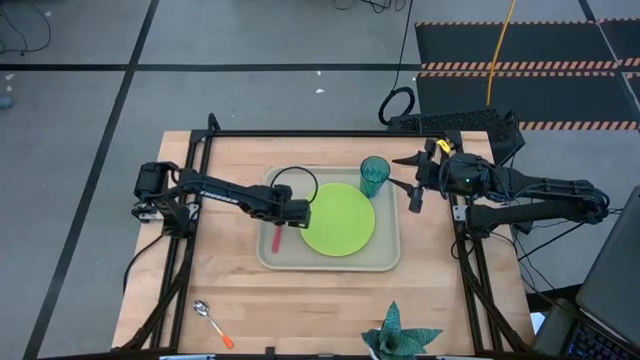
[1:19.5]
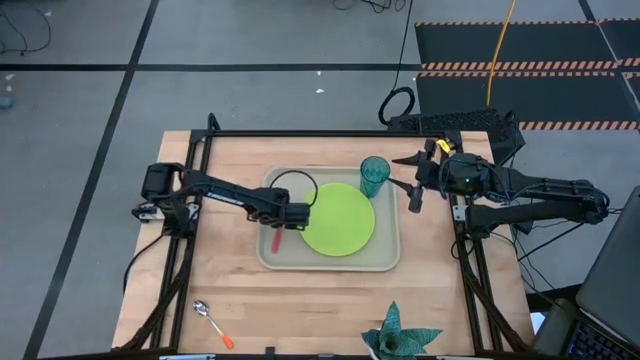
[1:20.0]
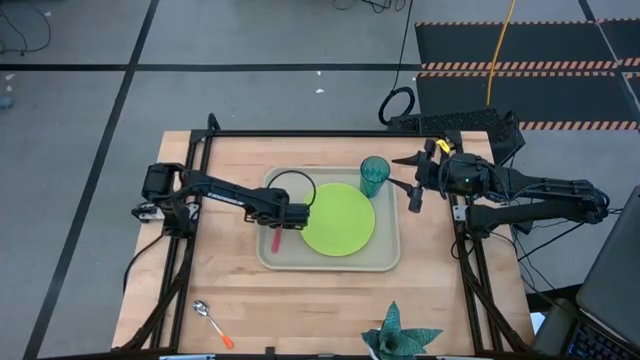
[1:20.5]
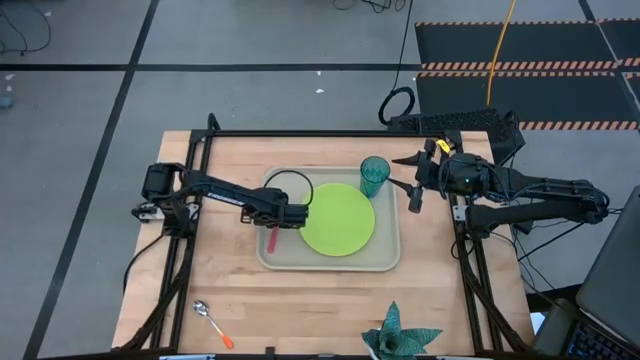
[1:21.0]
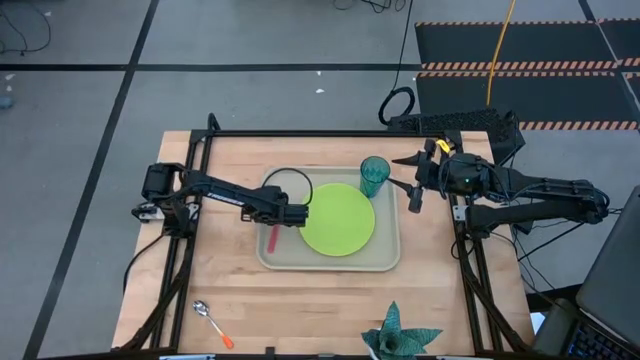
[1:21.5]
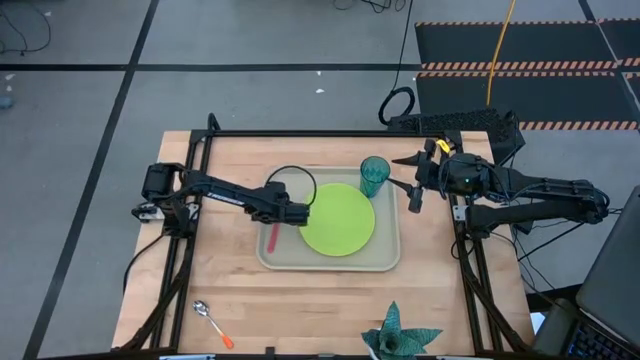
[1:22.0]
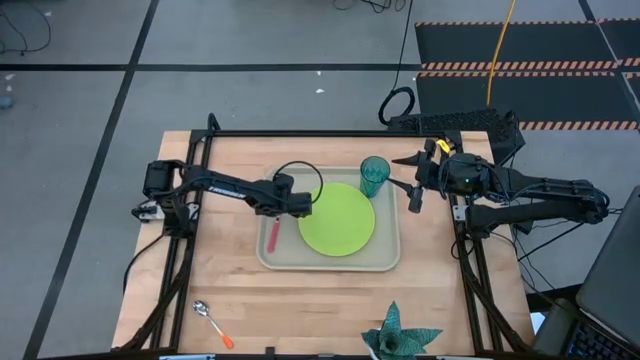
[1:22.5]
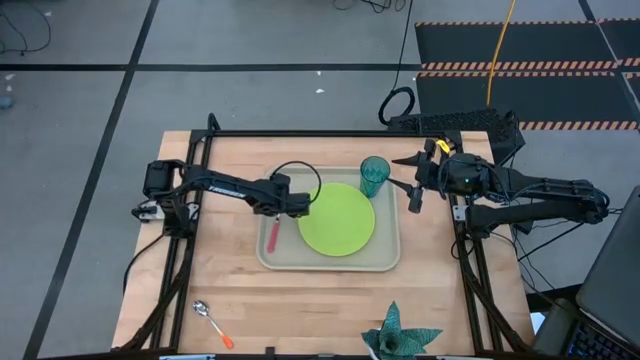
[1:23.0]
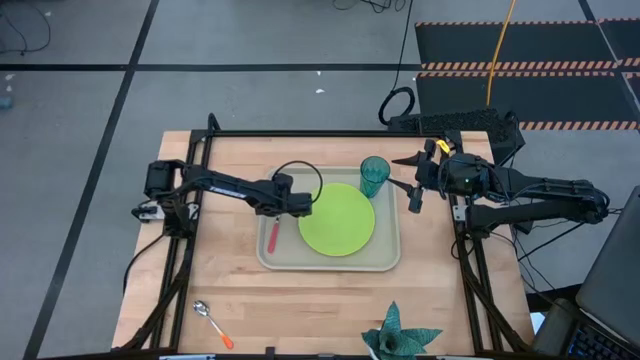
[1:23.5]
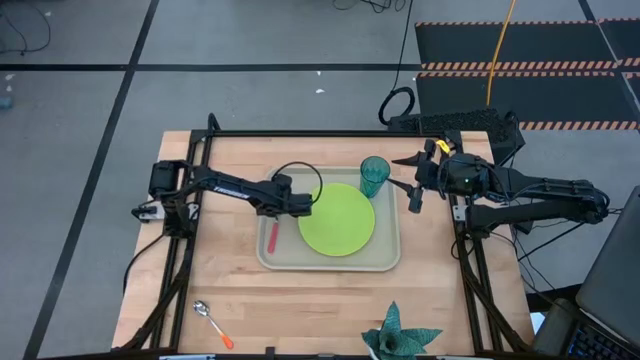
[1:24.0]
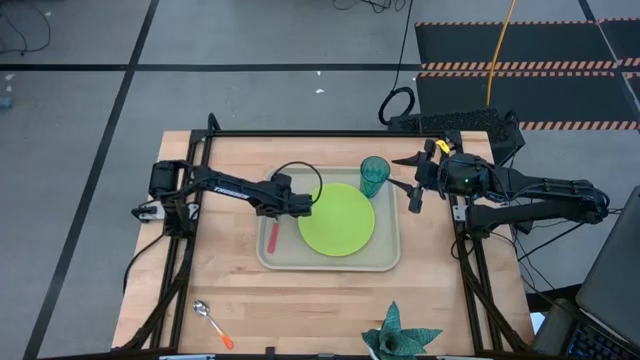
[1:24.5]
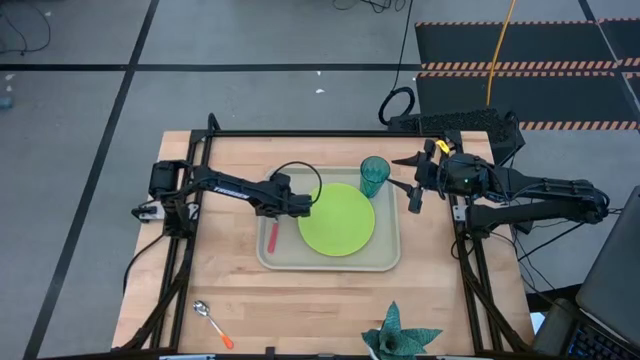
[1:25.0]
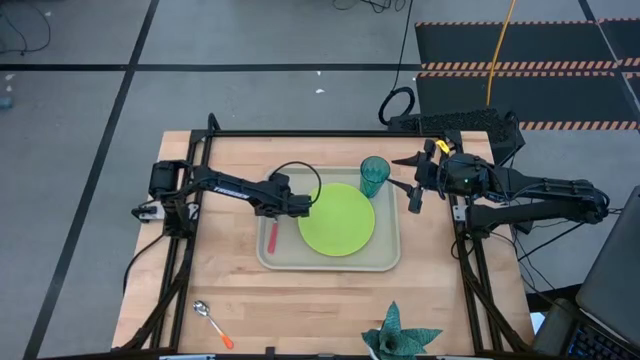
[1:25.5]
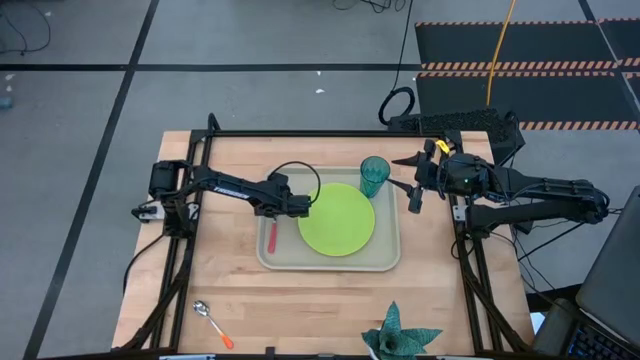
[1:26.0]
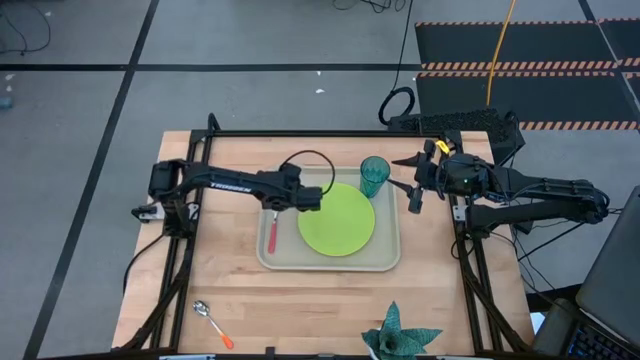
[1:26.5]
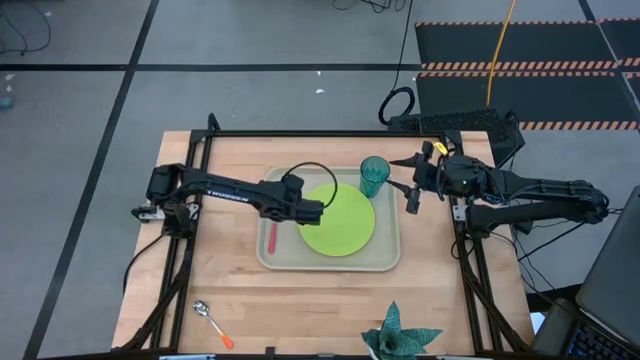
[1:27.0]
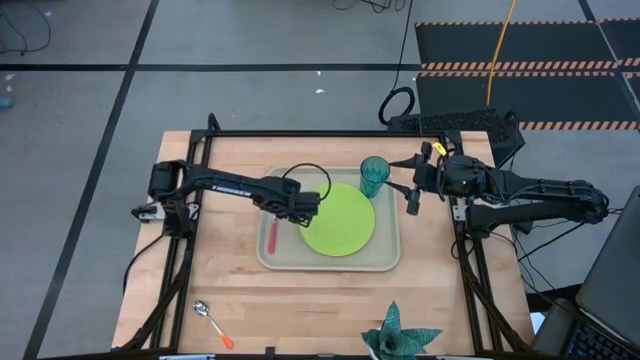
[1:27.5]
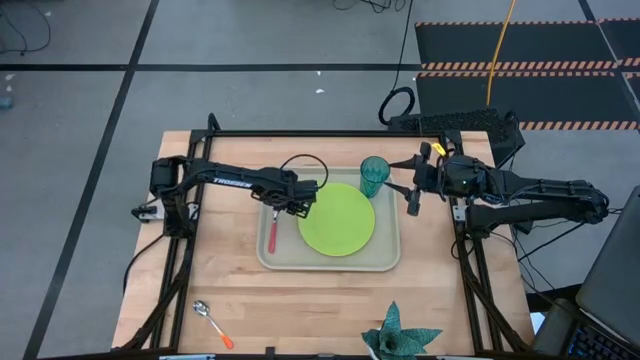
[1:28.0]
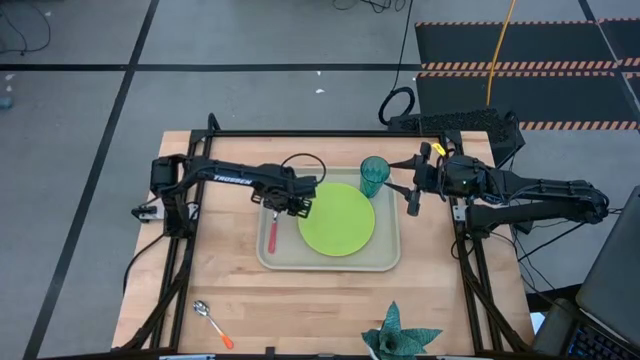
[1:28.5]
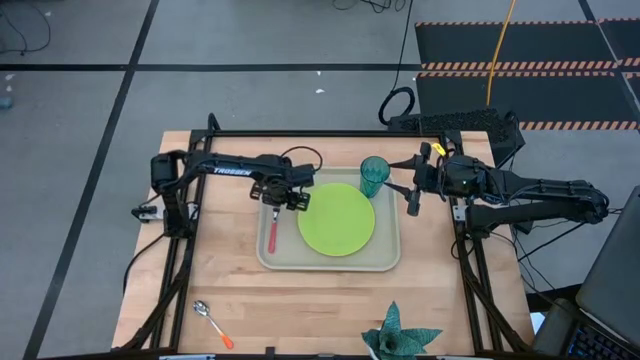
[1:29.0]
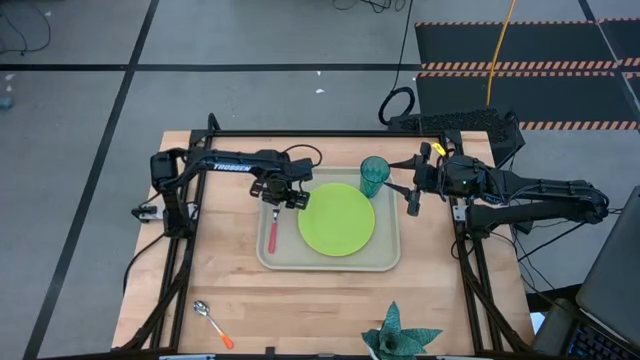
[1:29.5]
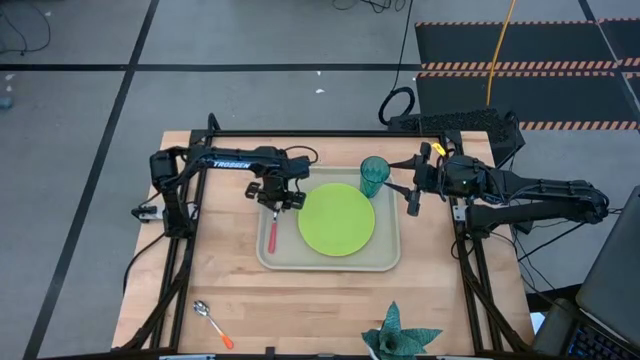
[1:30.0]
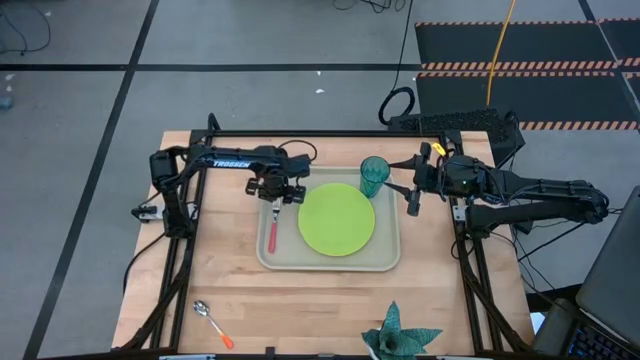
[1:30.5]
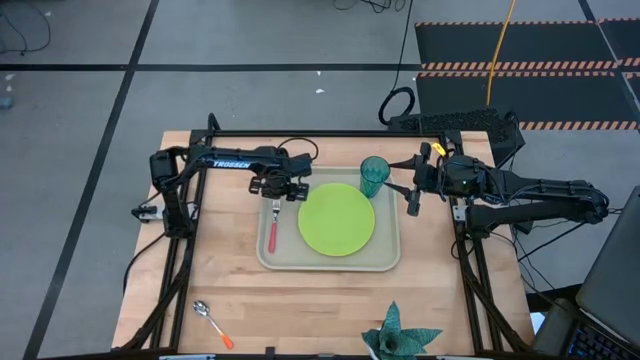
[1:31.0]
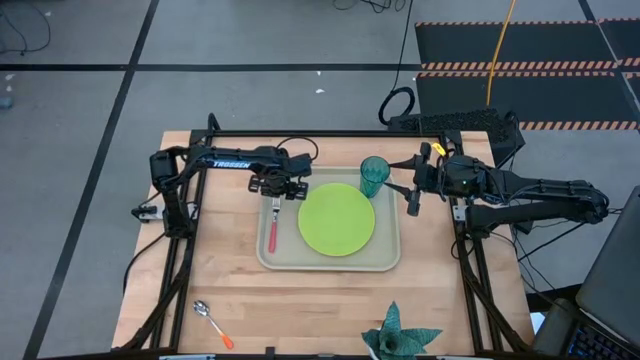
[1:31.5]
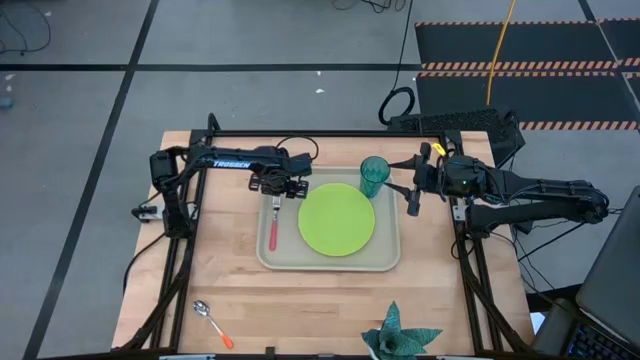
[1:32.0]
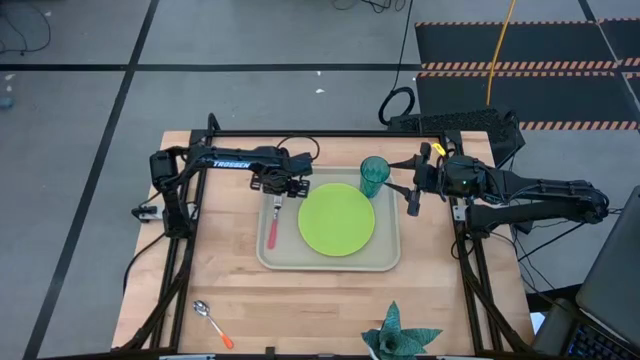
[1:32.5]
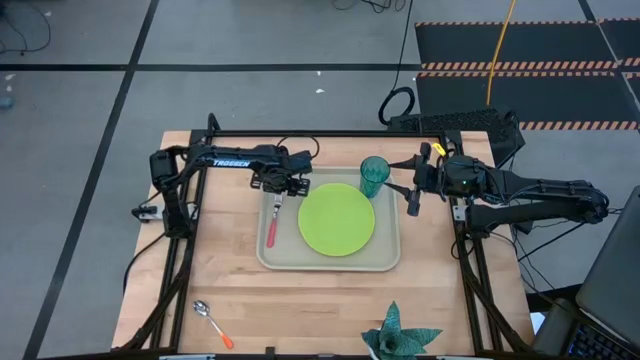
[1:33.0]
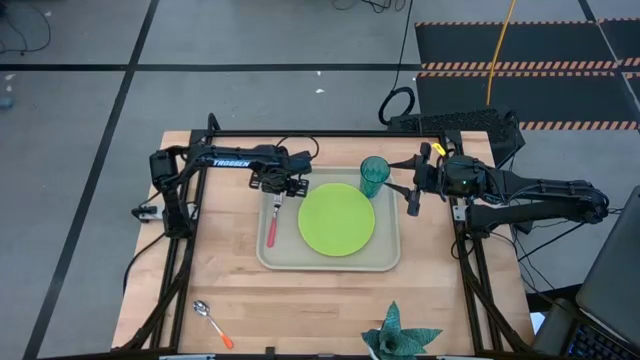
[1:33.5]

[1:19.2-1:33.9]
Task: Pick and place plate/cup/fork/spoon on tray
Put the pink fork on the light brown serving tray to the left of the light green plate

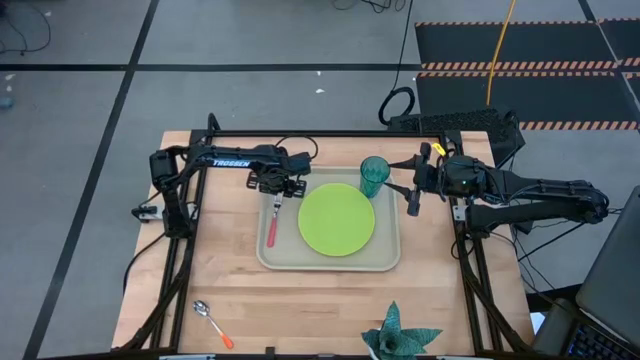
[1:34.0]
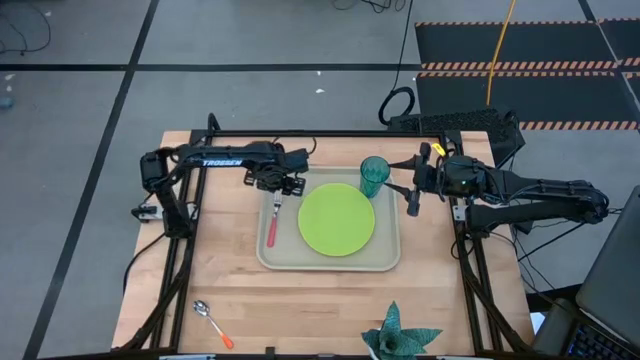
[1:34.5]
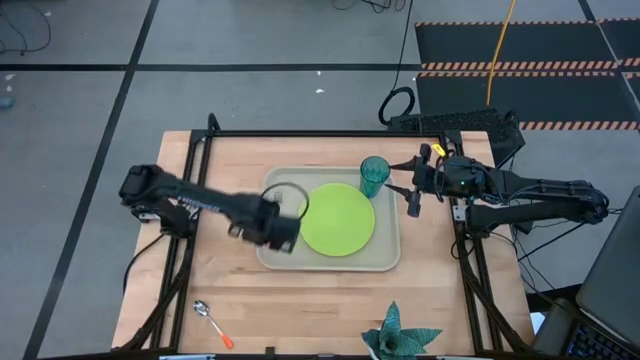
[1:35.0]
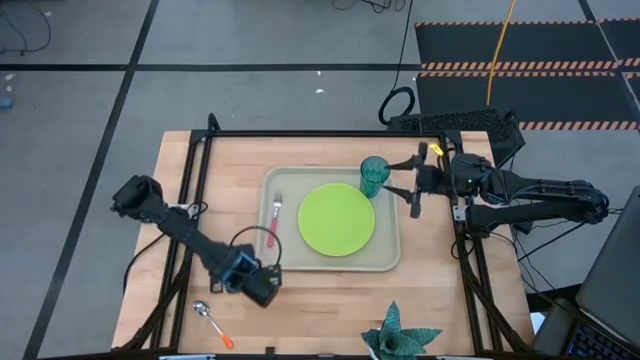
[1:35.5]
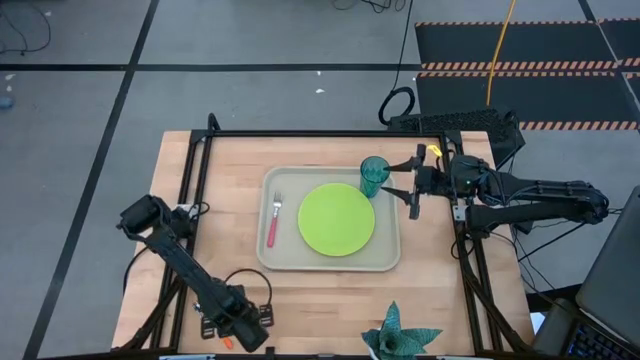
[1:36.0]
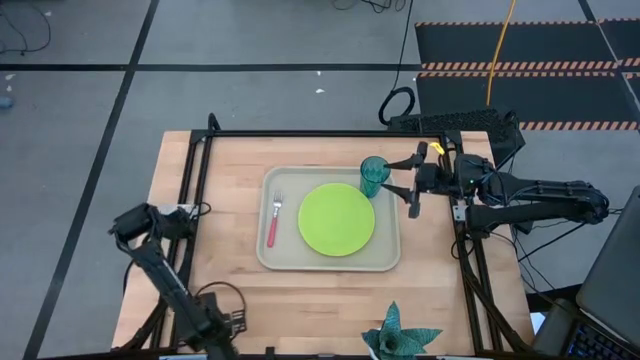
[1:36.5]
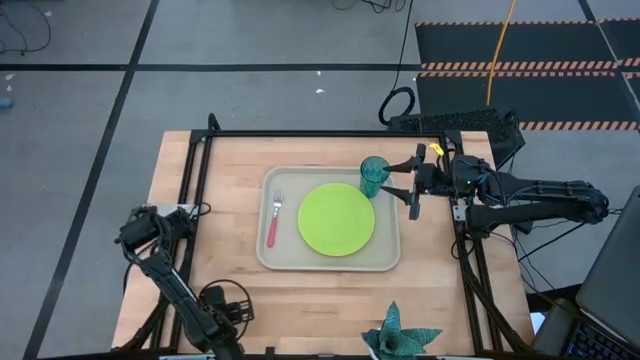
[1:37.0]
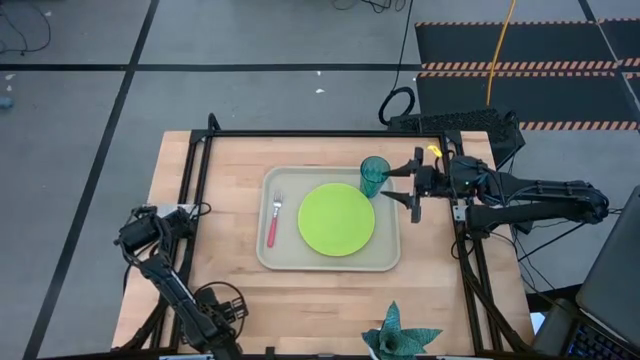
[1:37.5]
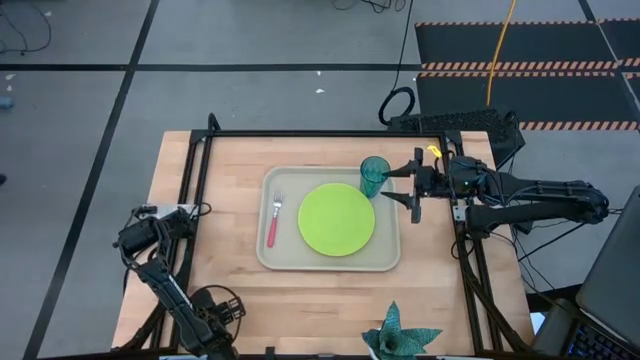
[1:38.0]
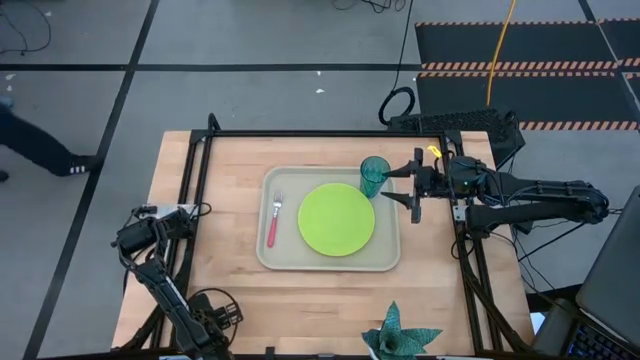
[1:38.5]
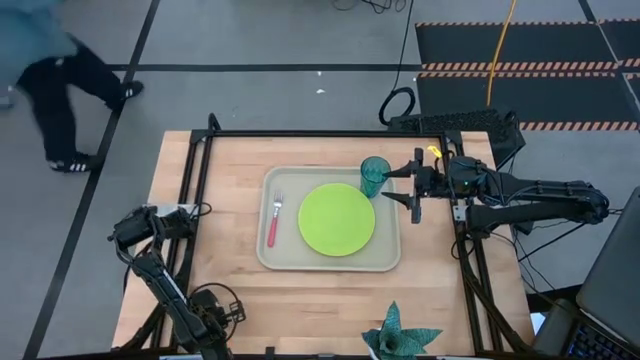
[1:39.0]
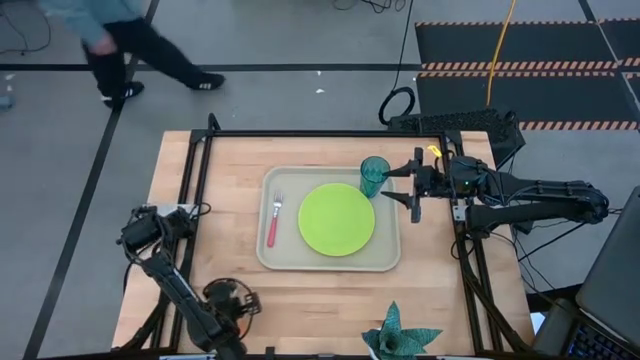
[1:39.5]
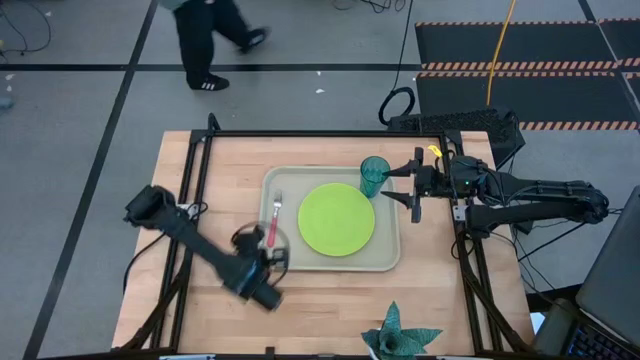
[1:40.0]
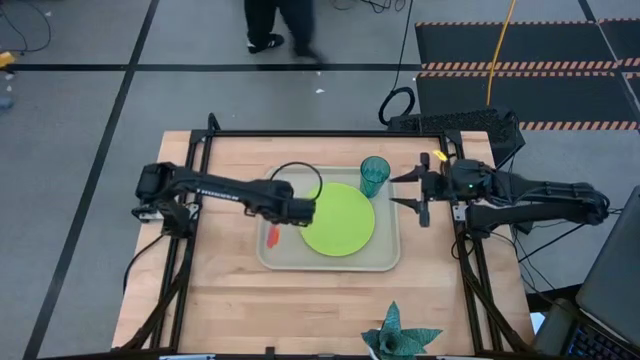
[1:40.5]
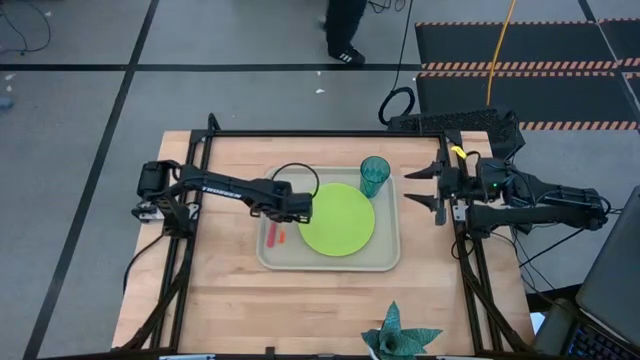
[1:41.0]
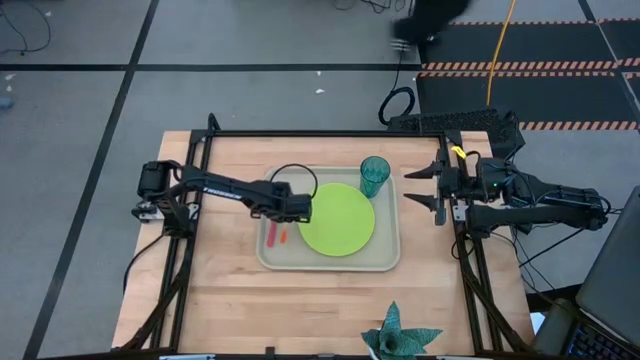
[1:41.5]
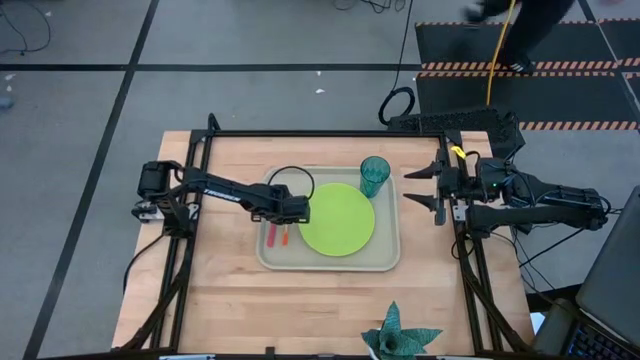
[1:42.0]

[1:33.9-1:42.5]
Put the orange spoon on the light brown serving tray to the left of the light green plate
